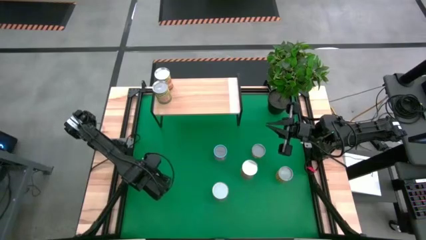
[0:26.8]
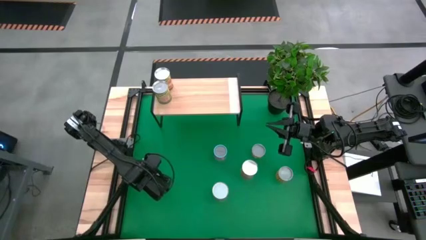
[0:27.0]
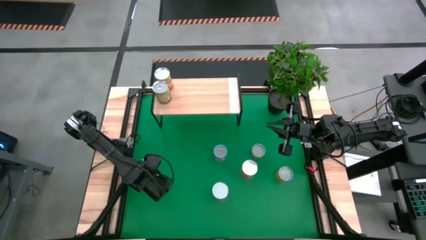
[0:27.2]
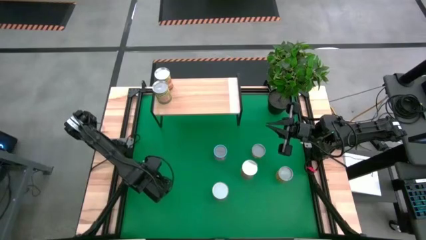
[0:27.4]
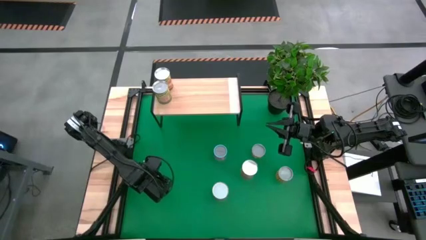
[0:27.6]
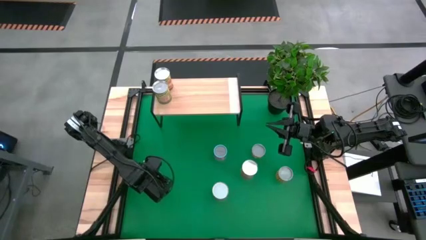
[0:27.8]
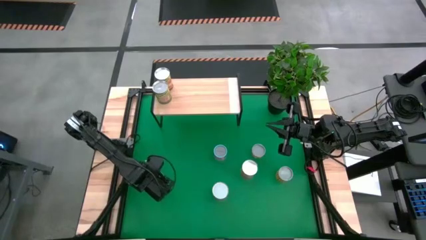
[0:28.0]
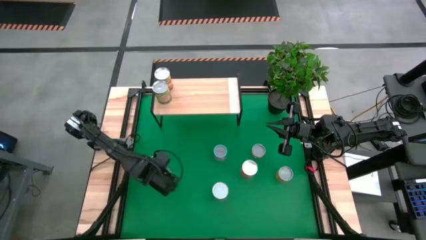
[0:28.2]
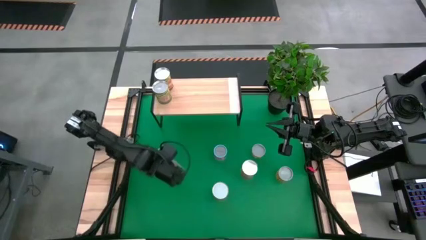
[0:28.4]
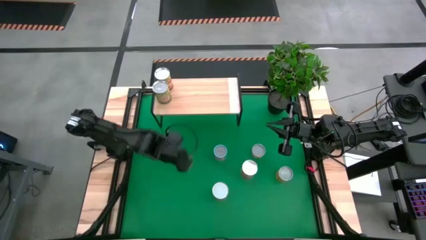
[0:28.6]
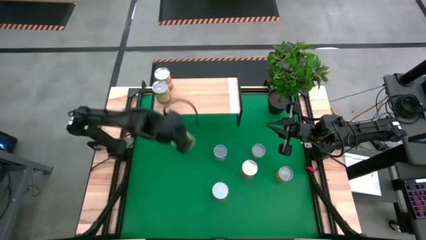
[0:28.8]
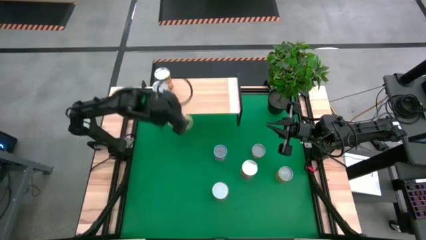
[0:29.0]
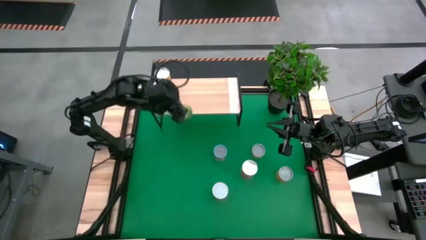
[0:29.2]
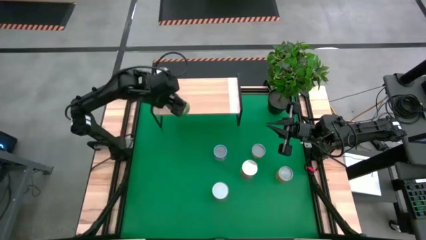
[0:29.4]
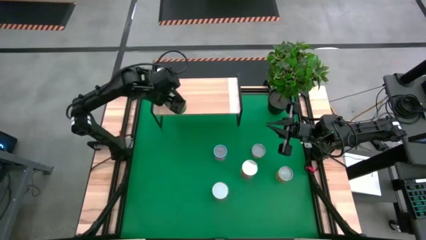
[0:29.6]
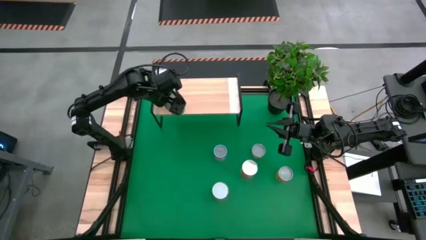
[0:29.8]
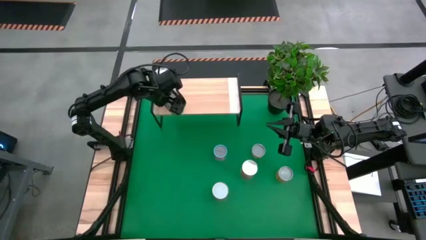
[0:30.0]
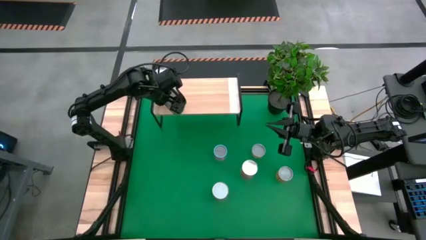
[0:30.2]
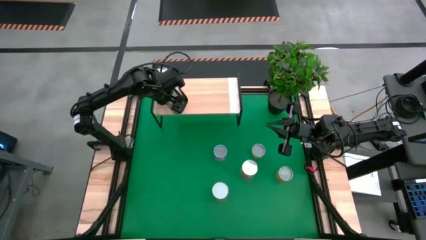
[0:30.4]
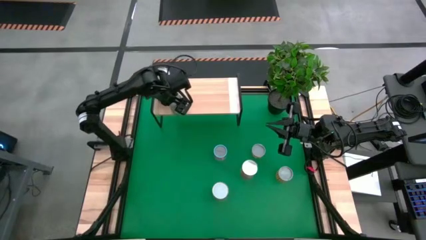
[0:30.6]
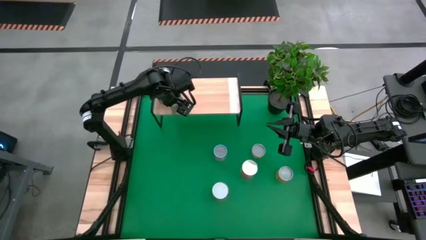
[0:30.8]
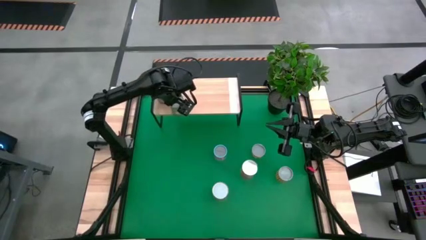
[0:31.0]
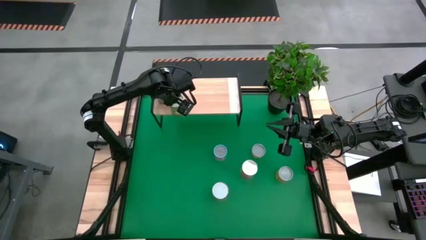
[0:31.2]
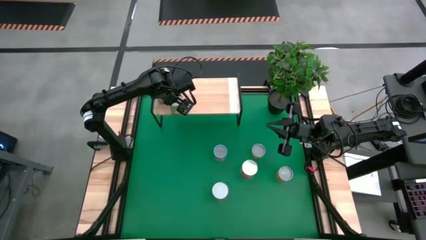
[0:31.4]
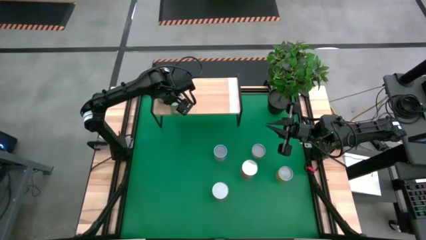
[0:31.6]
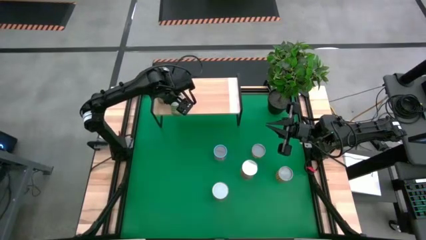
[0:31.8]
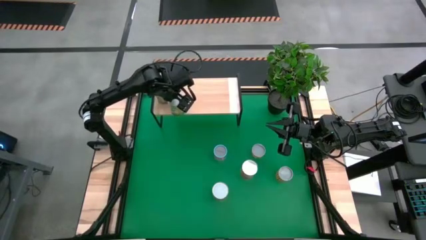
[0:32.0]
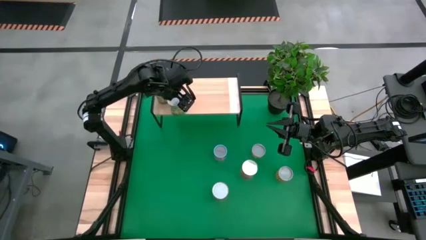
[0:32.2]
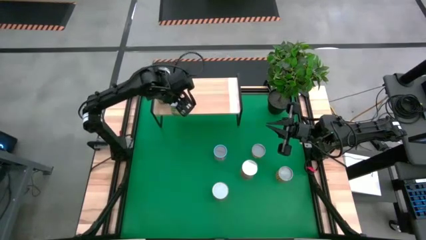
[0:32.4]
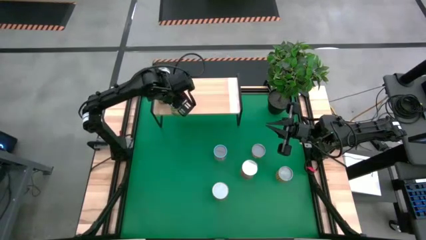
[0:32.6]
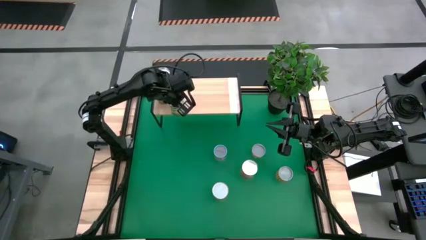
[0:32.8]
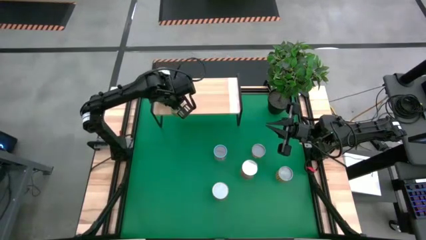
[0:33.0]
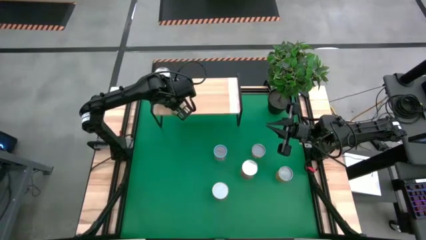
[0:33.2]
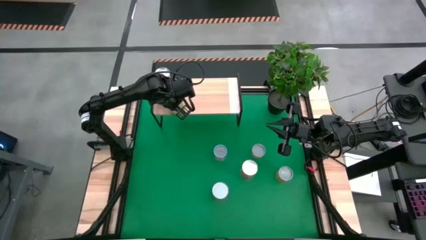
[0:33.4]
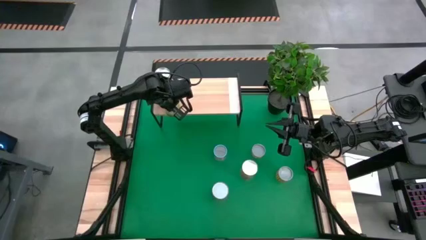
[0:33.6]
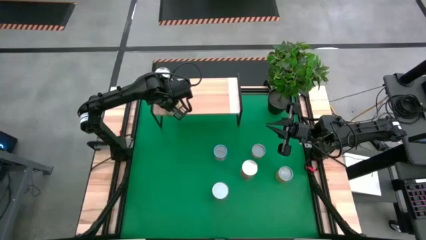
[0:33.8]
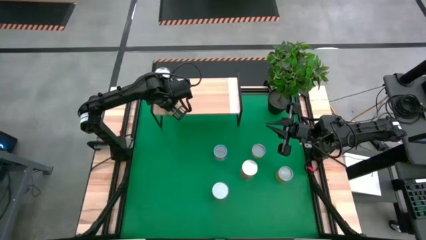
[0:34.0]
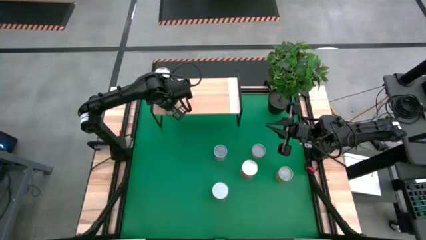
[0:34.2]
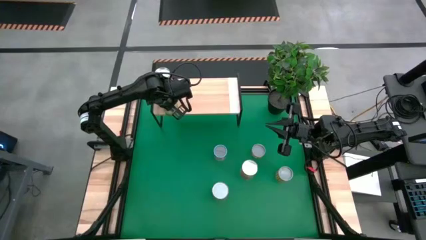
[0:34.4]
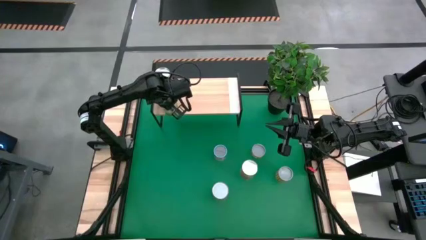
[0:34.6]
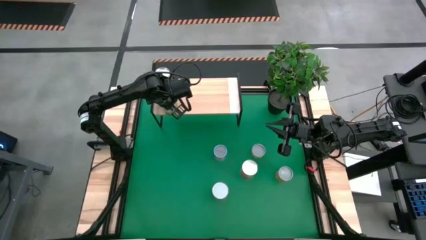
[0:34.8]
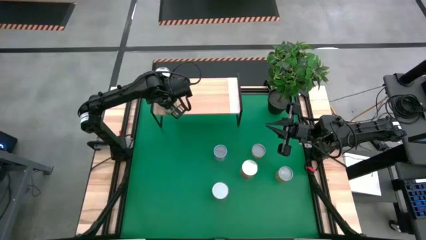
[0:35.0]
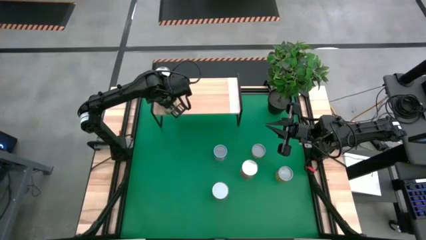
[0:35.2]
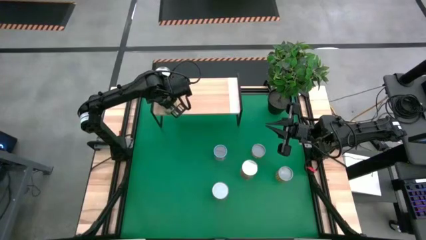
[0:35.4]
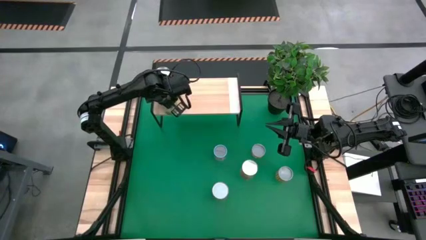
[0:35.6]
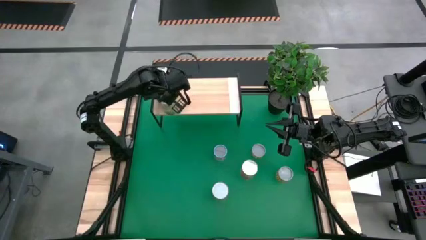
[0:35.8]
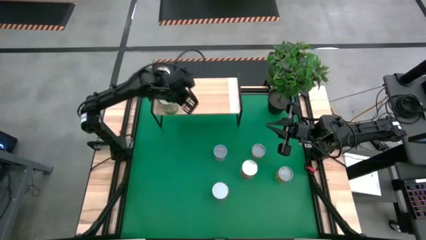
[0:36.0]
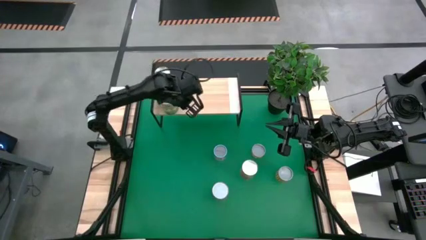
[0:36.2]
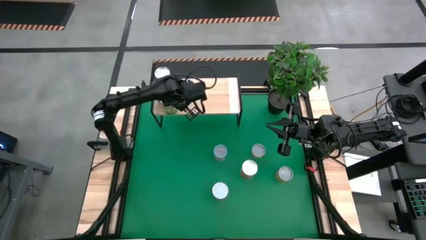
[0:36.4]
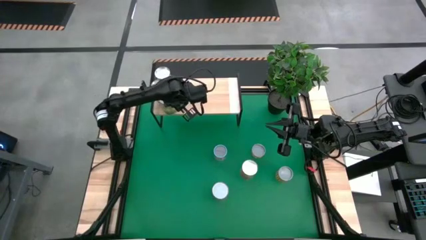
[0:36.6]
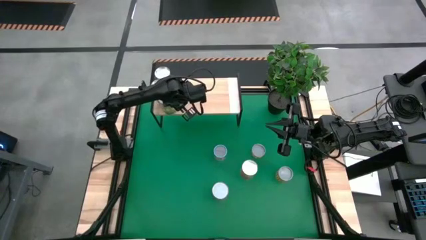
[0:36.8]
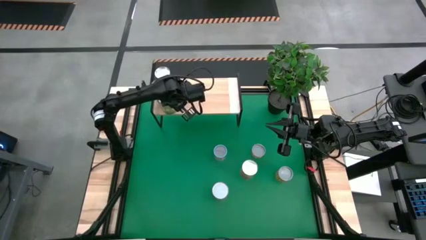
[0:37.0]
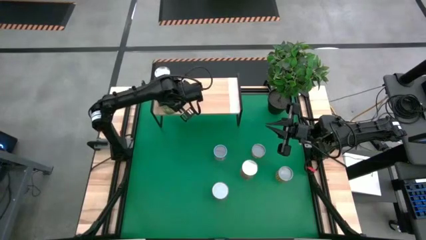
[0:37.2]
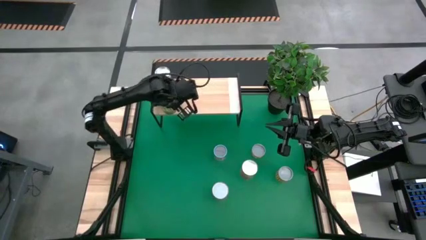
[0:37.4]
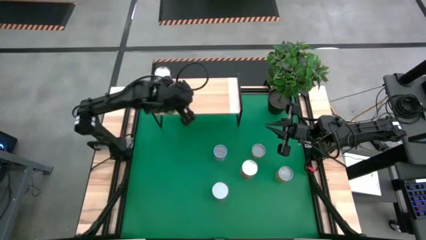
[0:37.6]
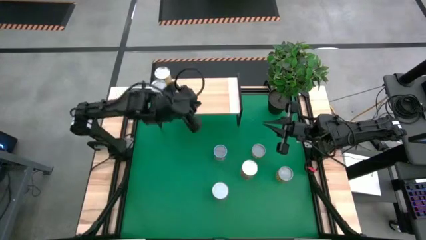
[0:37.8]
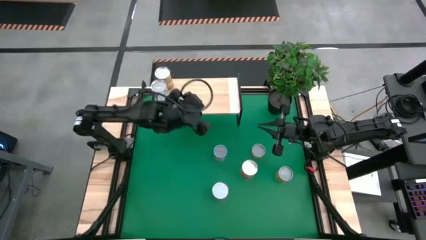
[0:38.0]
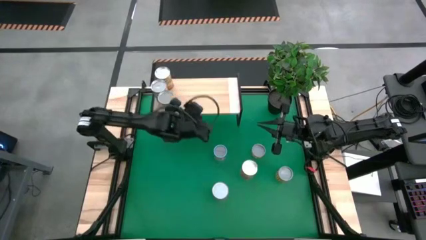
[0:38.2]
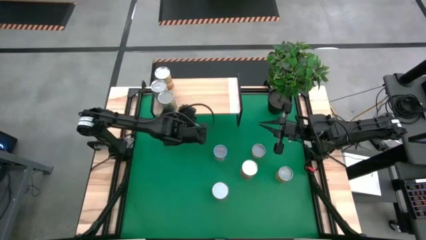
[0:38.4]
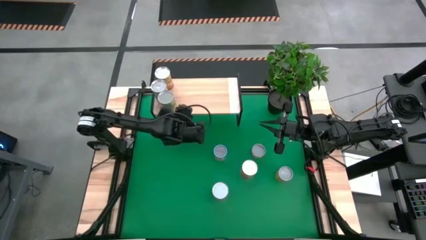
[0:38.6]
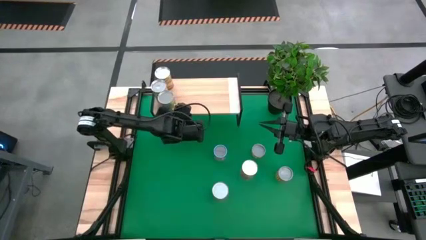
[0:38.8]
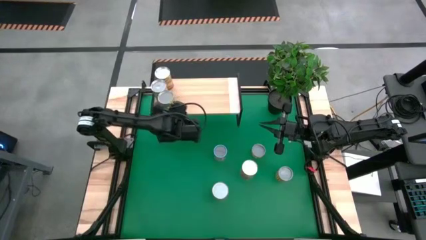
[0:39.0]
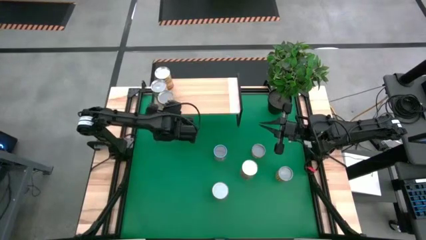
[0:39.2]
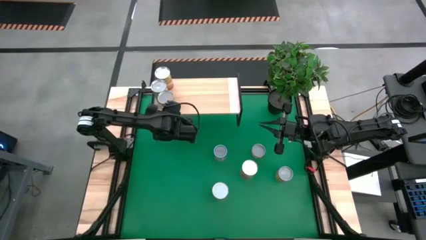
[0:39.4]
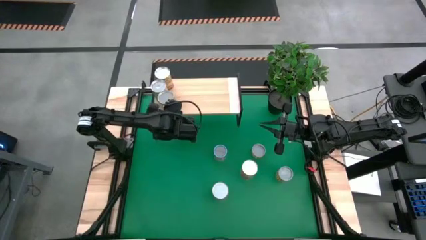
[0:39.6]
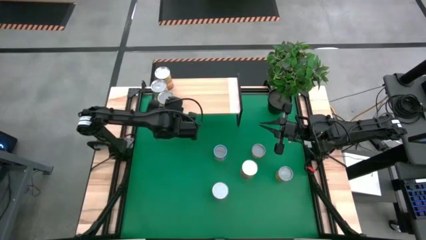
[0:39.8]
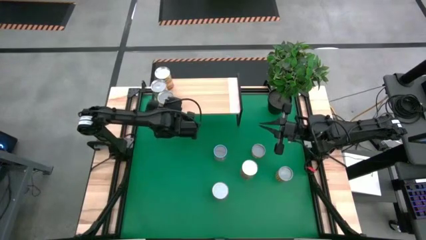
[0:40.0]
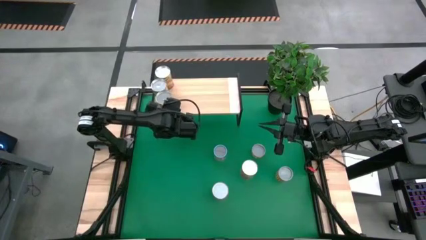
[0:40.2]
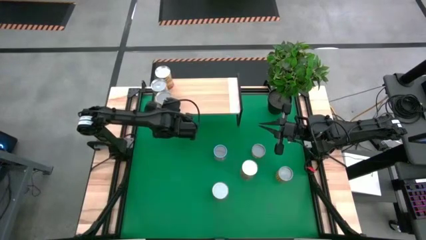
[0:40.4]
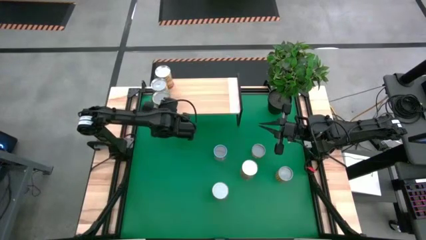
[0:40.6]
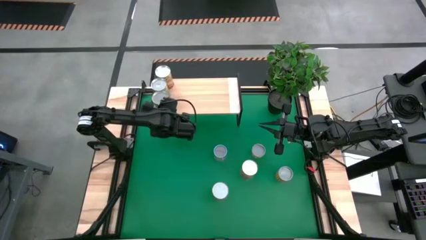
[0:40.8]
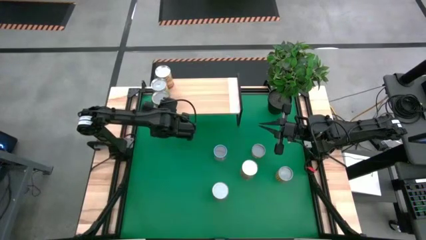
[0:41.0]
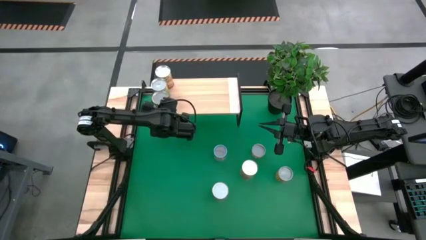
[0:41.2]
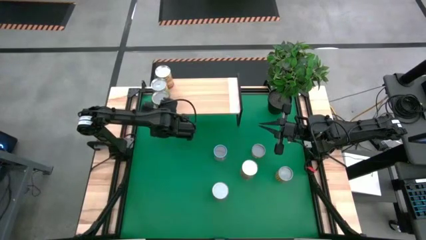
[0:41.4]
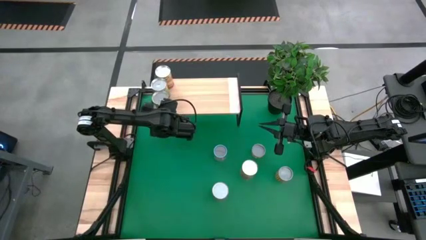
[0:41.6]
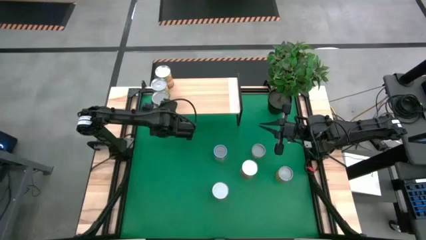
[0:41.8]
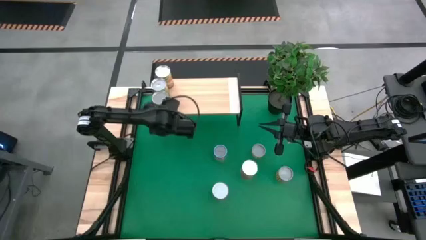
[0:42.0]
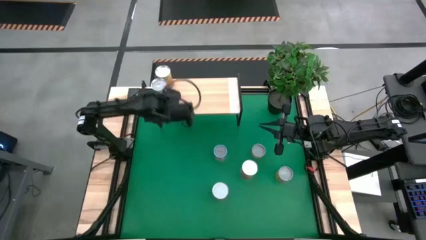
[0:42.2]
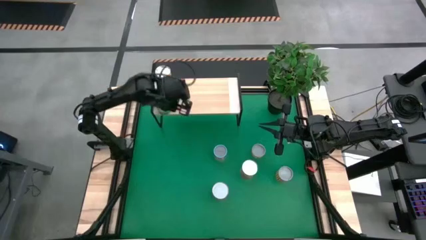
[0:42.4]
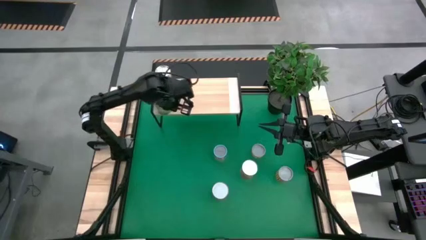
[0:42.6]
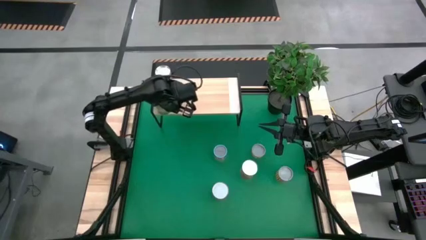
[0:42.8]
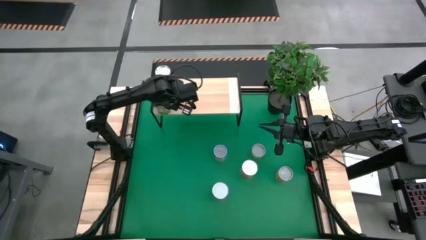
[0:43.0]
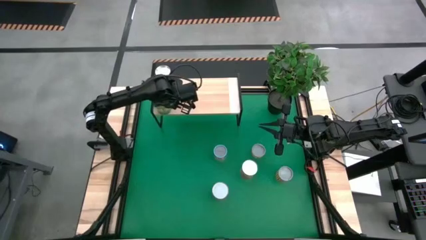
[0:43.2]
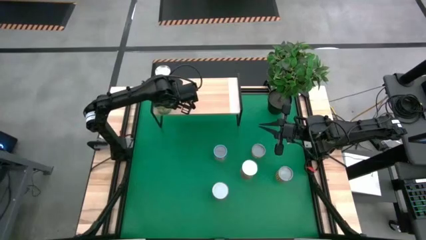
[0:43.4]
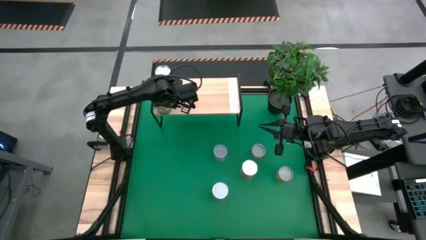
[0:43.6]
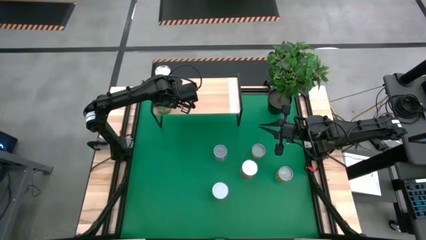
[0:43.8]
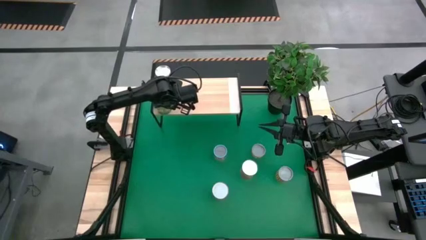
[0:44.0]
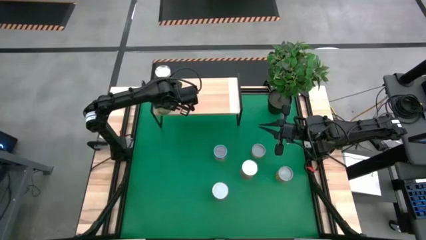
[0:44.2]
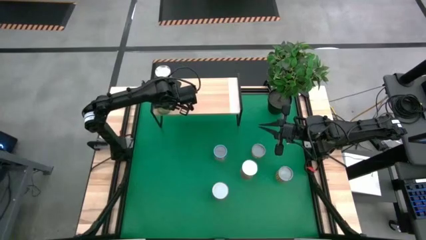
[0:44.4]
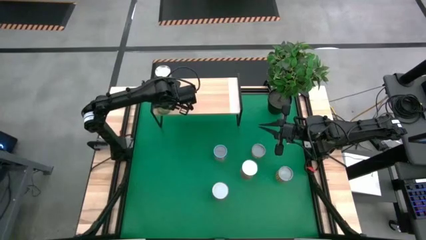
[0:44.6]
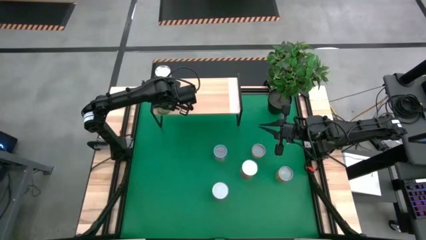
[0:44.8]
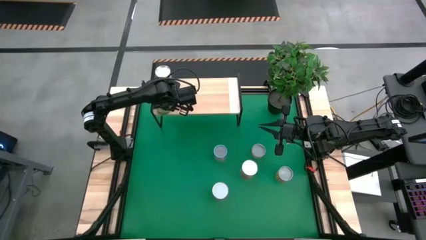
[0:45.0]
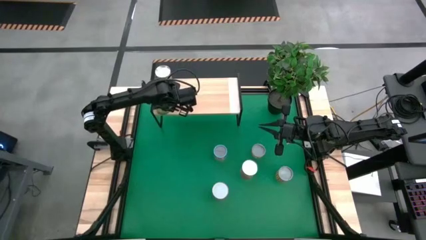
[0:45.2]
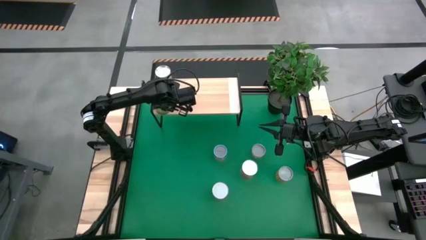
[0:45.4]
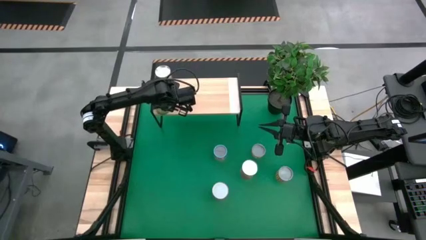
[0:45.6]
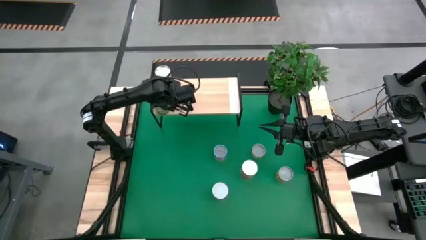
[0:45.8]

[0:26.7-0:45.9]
Task: Pick and place cans onto a shelf
Put the pear can on the shelf
